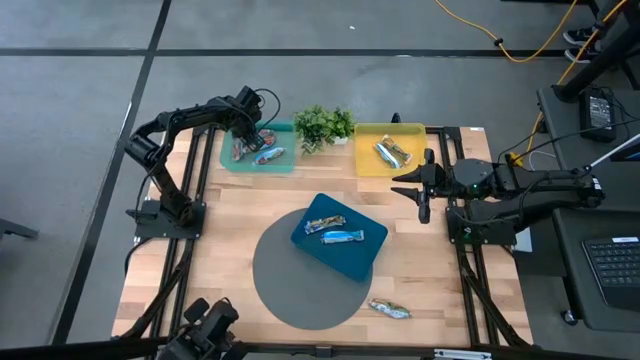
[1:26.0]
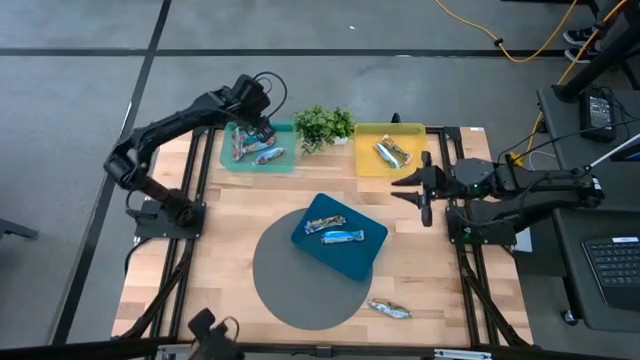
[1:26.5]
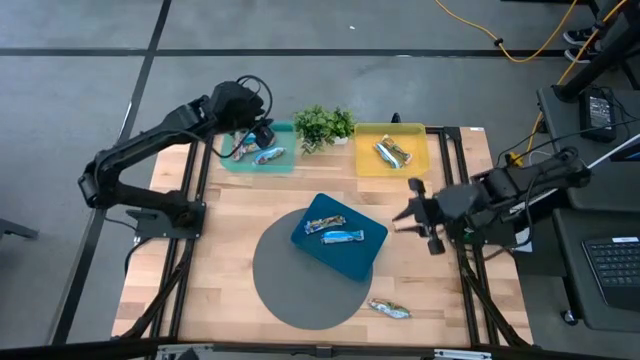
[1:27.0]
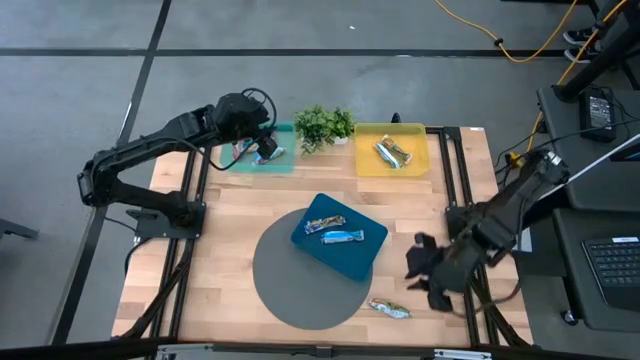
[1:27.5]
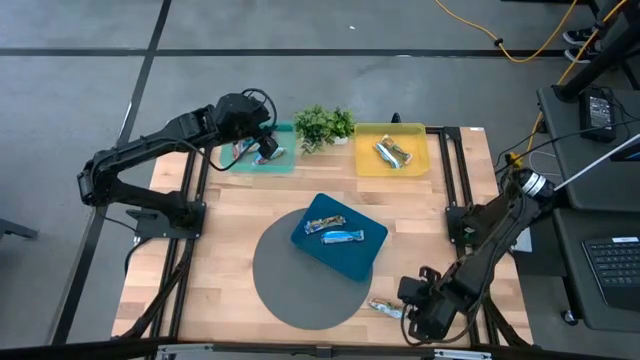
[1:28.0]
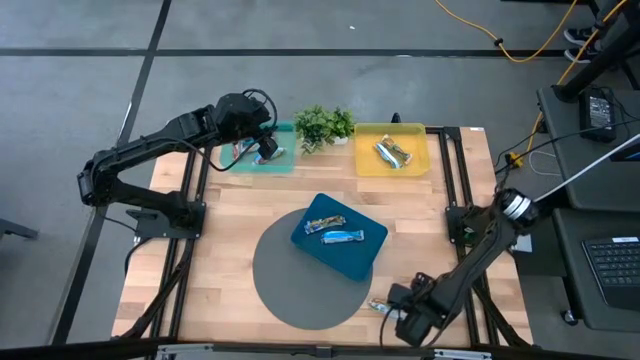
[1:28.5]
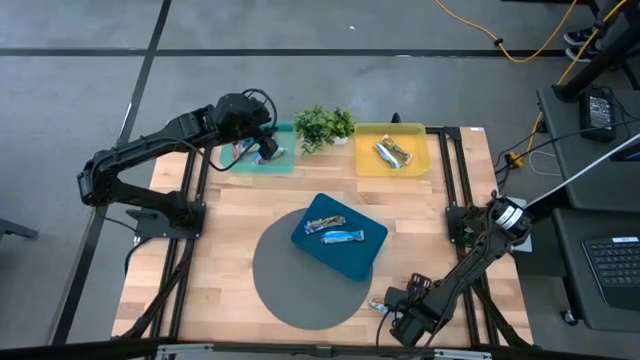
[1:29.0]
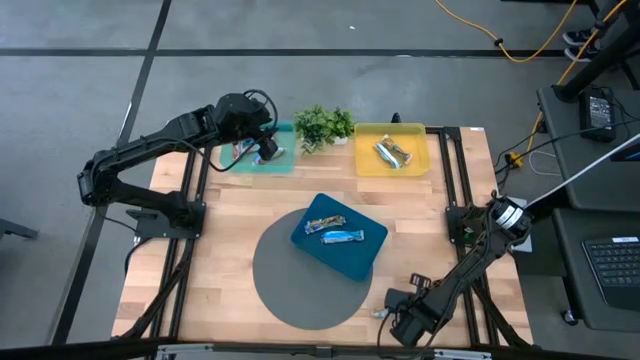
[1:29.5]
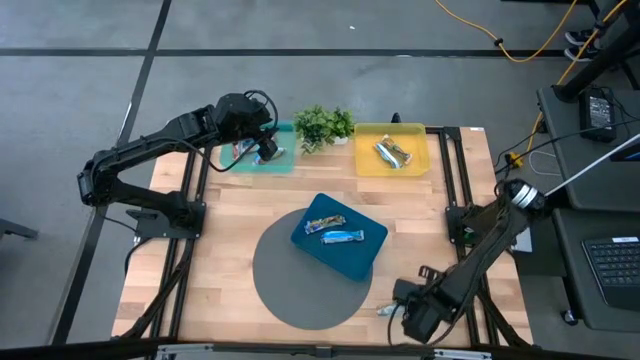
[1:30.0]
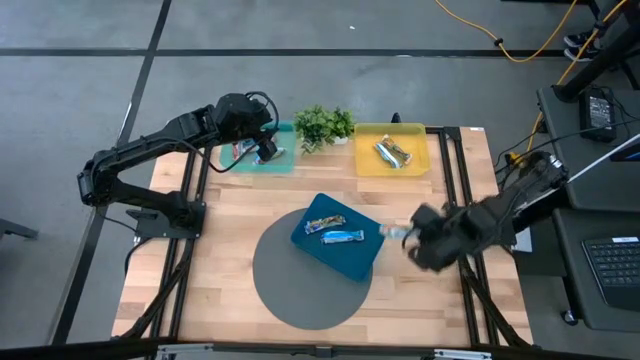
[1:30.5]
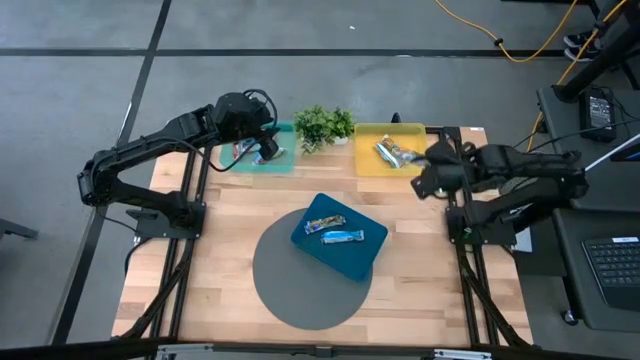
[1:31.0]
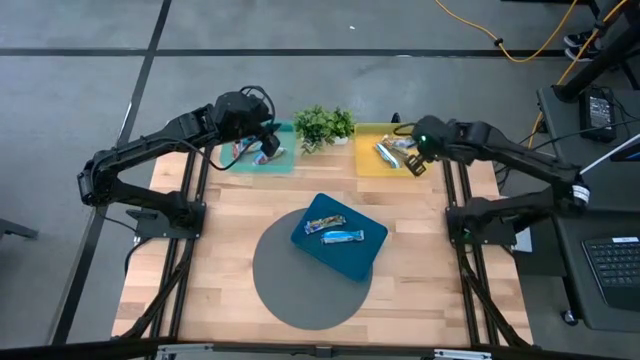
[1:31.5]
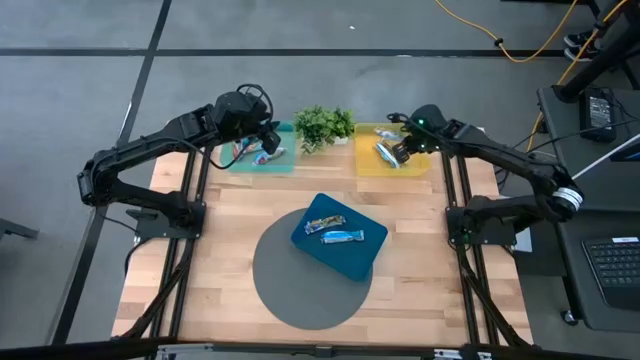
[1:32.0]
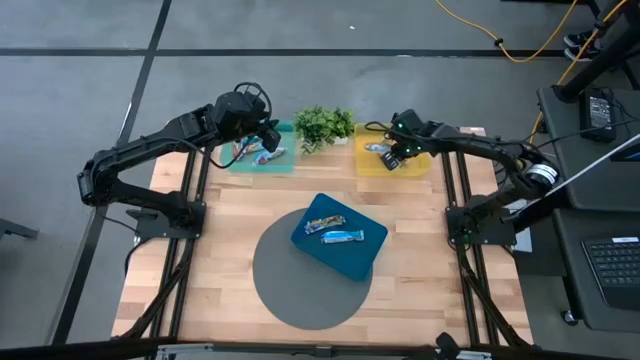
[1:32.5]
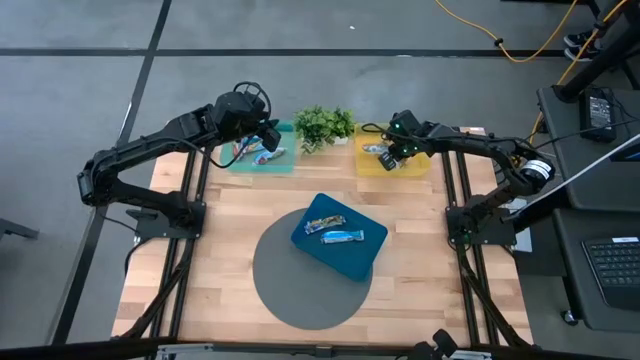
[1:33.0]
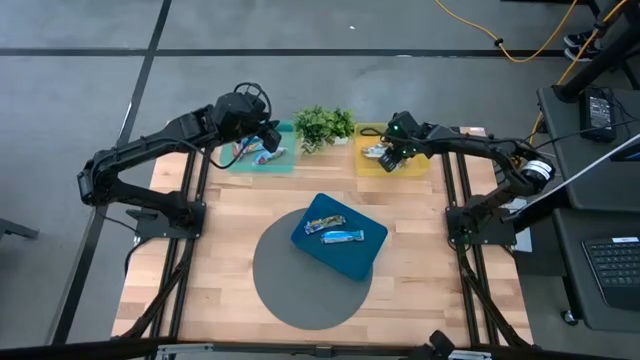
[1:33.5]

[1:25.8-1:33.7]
Task: Pick and place Granola Bars by type
Put the yellow granola bar into the yellow bin

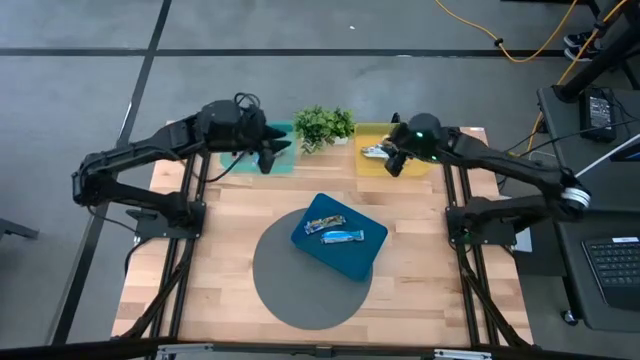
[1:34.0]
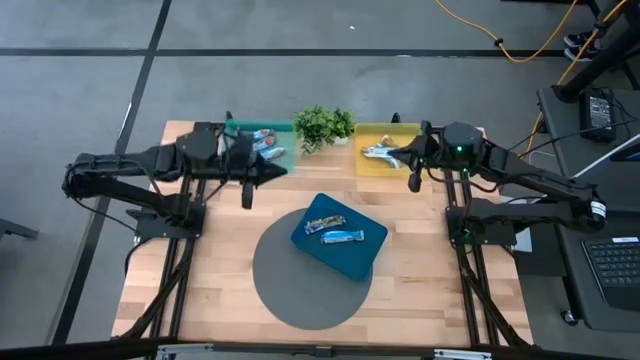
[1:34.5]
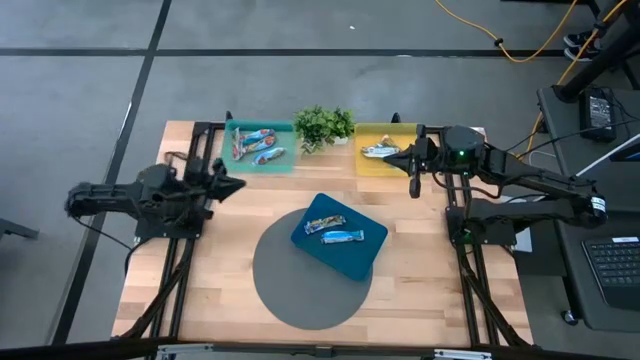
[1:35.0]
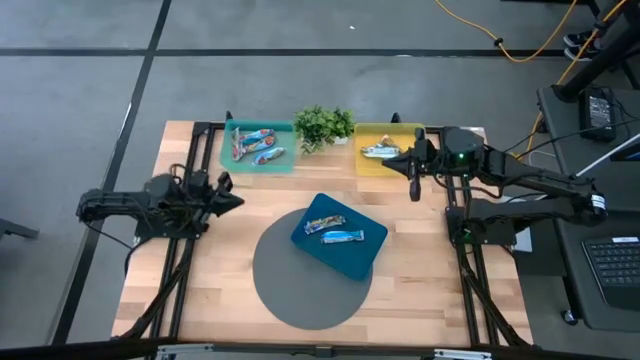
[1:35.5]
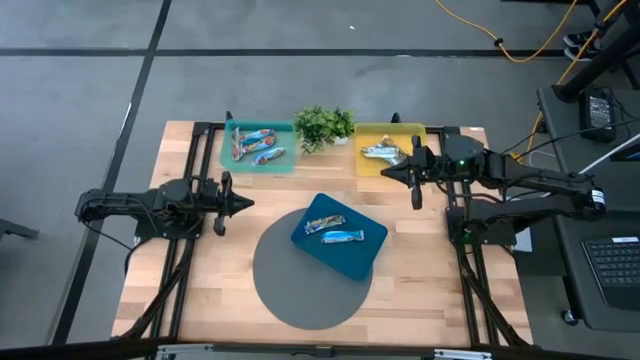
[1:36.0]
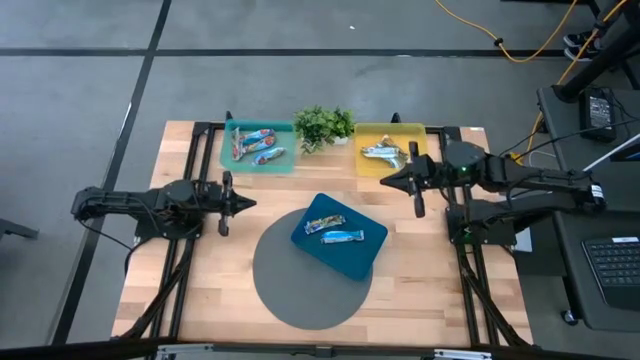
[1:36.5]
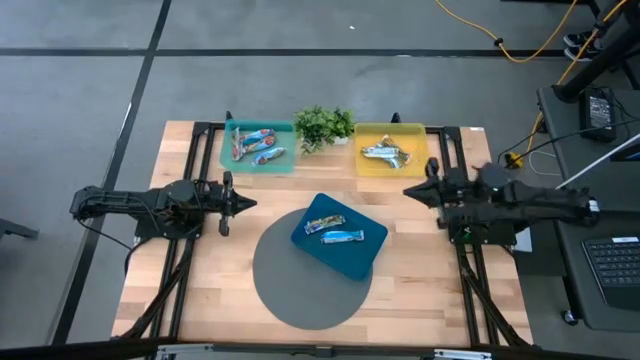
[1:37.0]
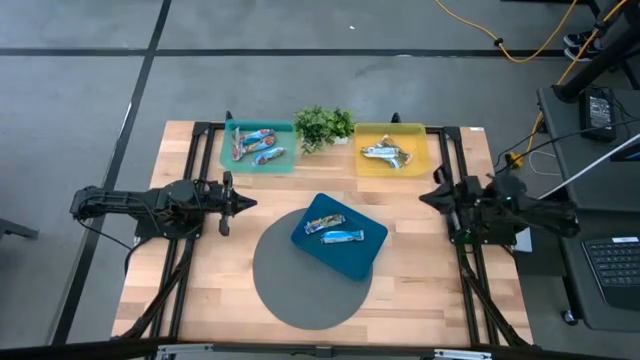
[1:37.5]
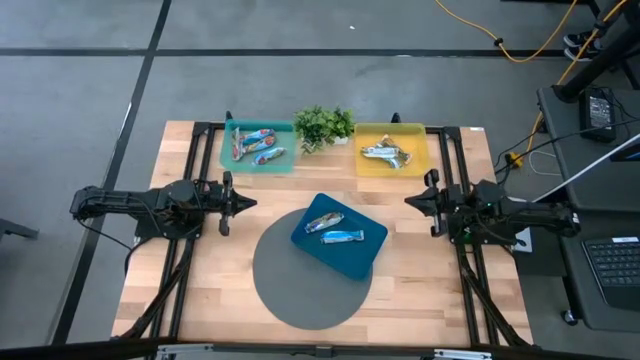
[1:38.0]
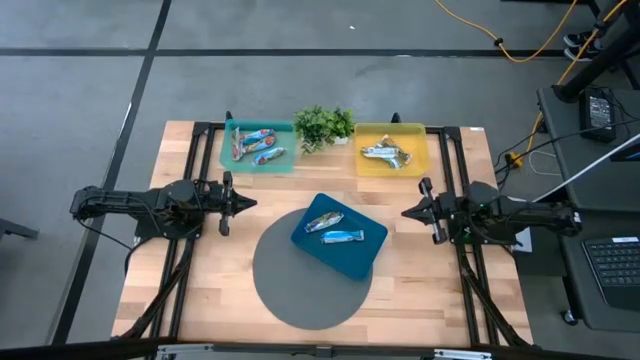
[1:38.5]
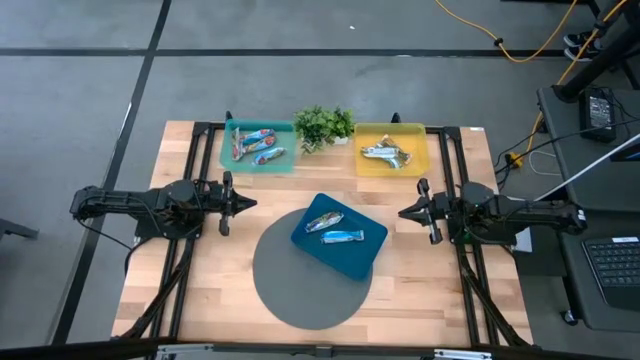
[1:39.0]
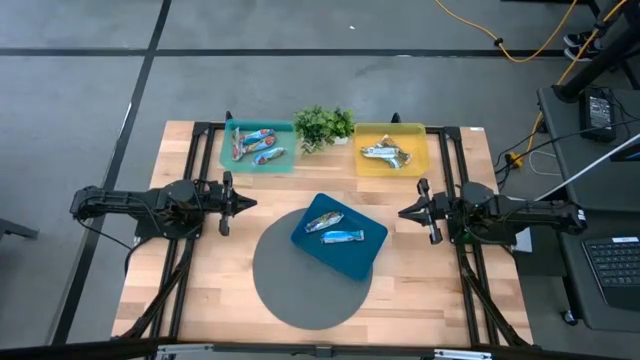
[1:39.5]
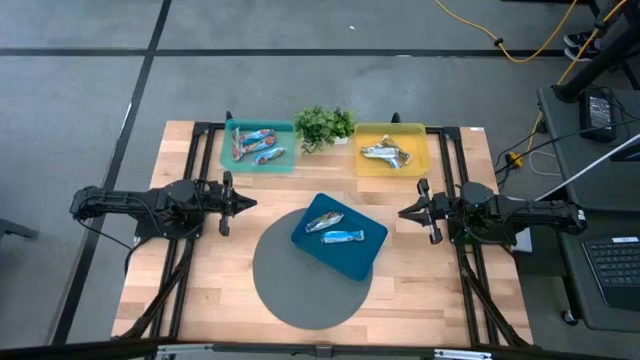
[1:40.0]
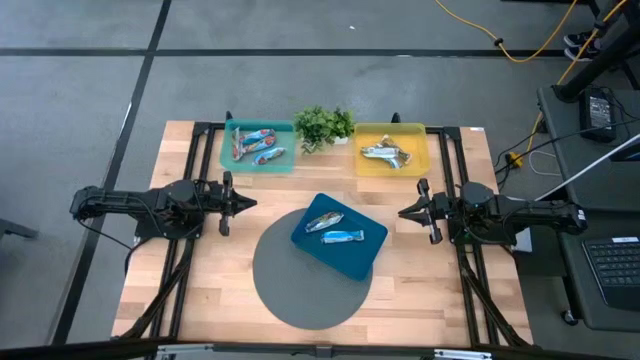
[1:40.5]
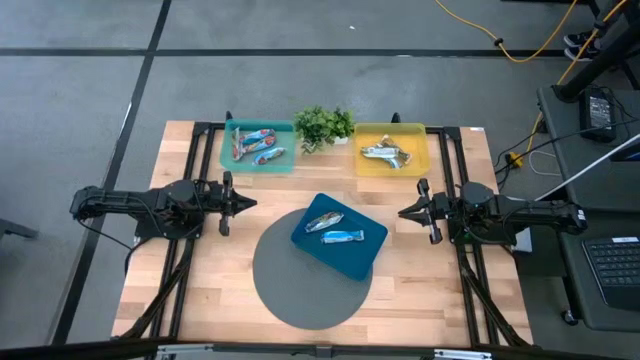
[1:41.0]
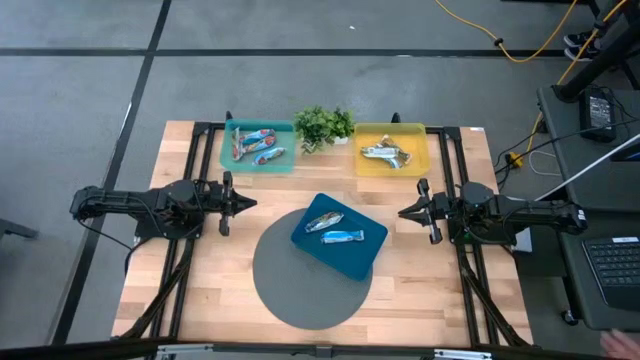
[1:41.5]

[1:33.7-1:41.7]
Return to Home Position

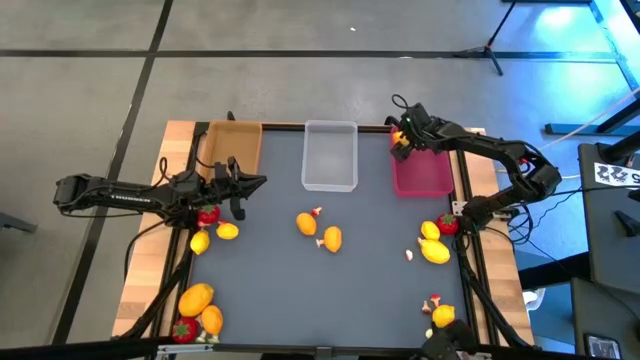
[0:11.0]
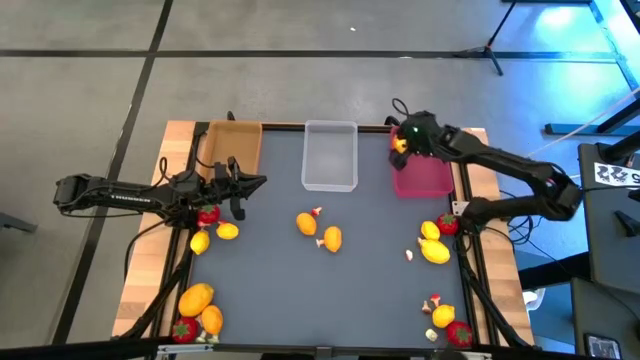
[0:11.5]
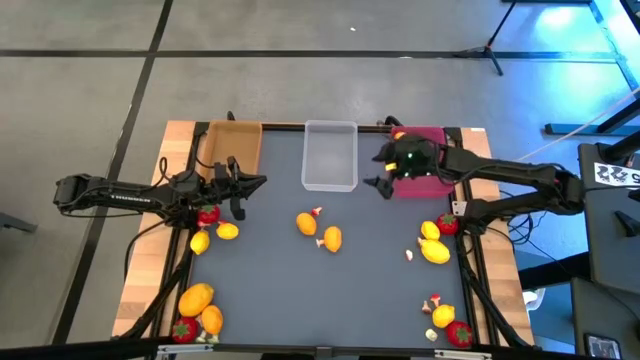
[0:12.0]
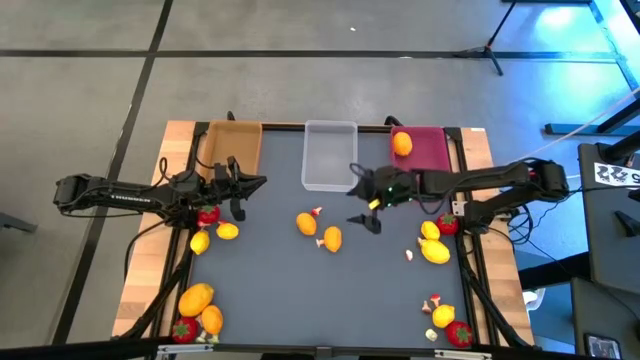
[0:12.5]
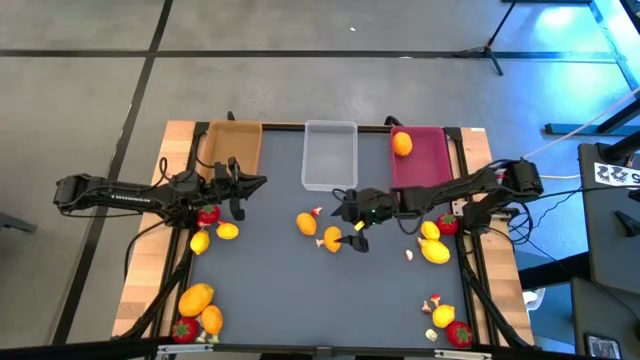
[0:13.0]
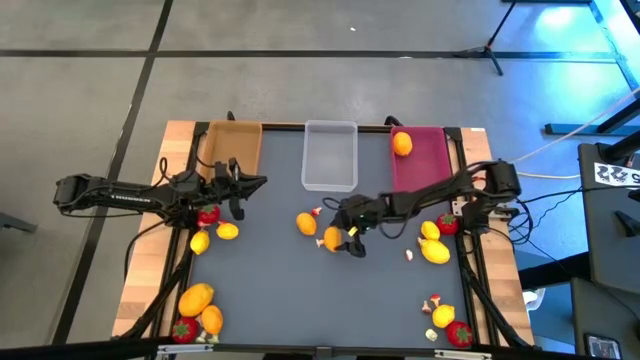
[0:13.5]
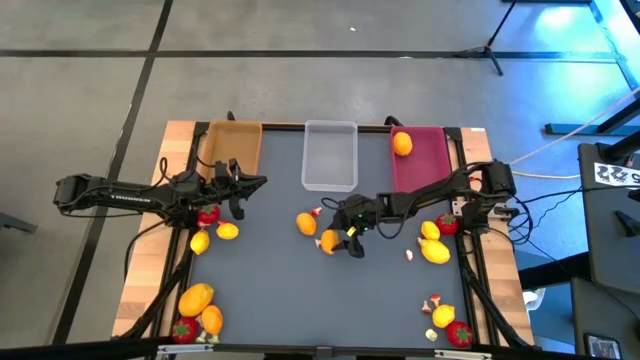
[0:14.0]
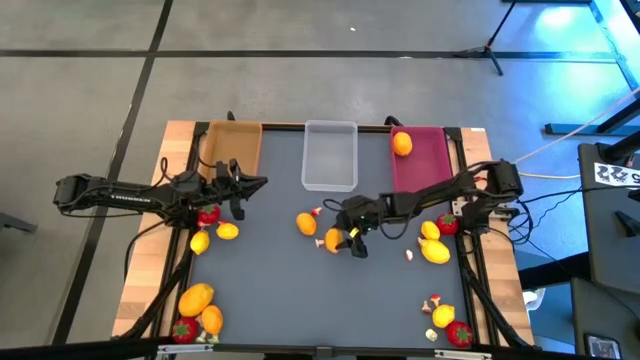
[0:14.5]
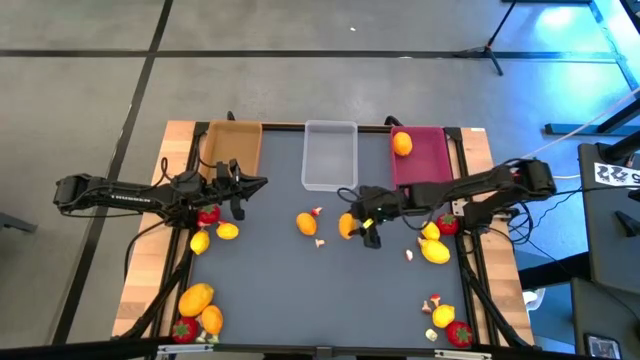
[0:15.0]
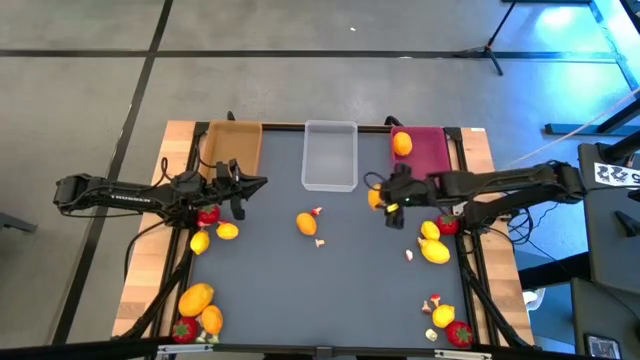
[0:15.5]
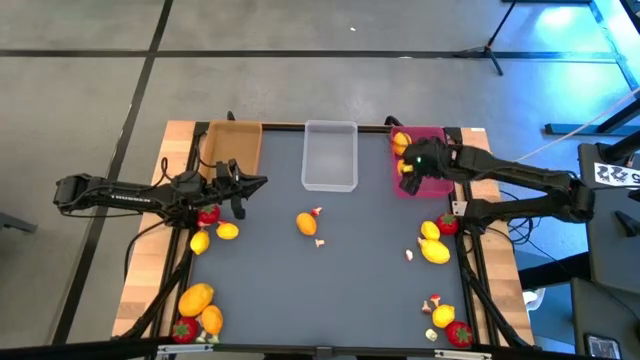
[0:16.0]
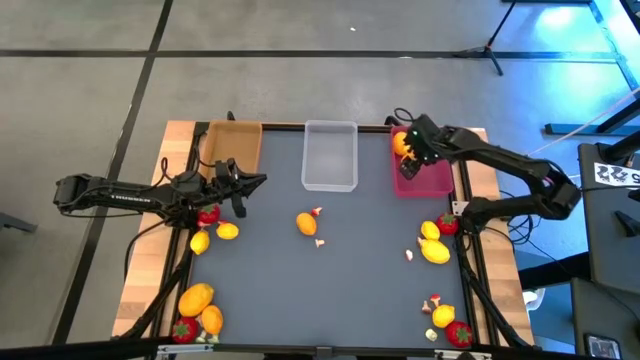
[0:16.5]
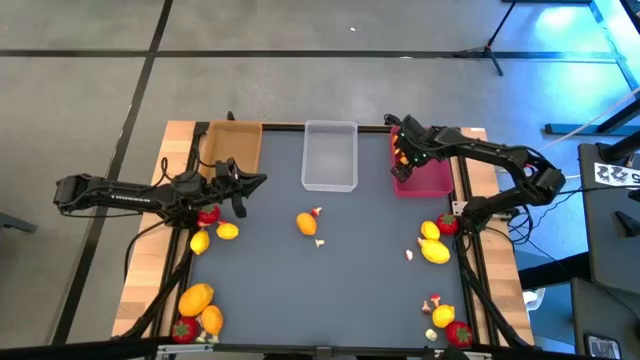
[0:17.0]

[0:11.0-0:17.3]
Task: Sort produce into baskets
Put the lemon into the pink bin
